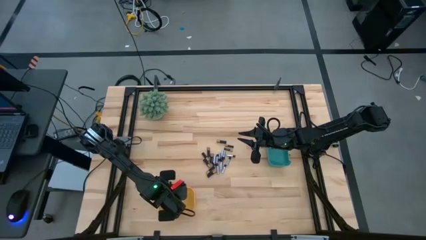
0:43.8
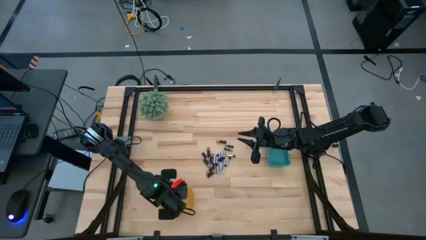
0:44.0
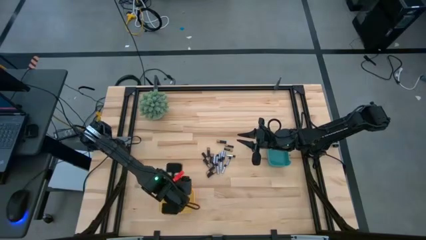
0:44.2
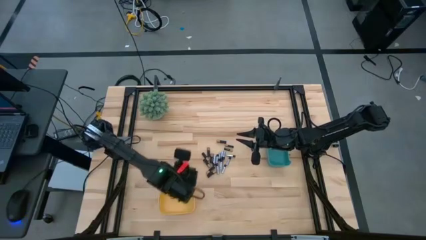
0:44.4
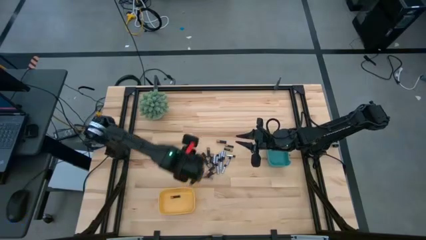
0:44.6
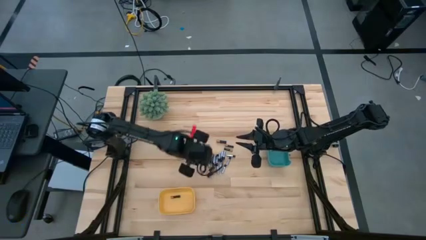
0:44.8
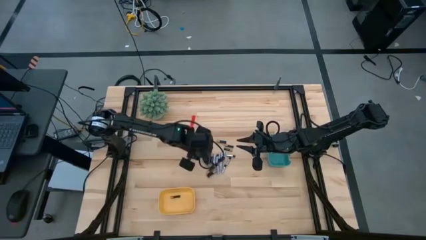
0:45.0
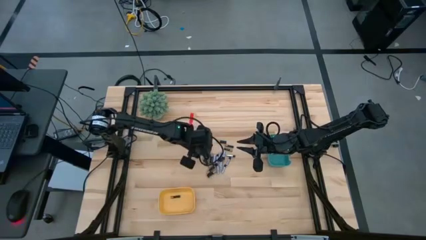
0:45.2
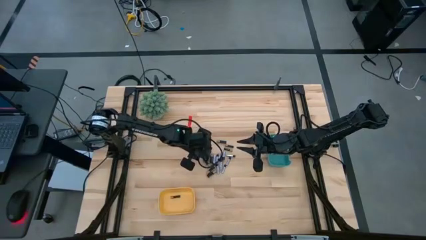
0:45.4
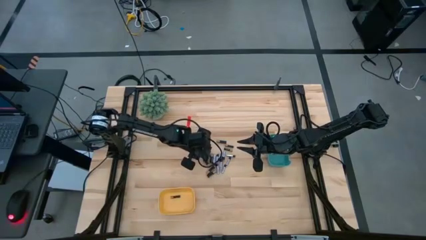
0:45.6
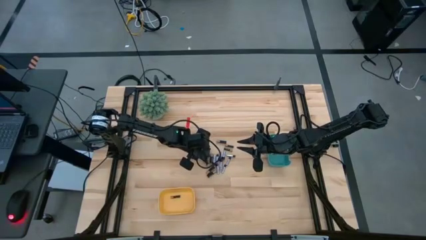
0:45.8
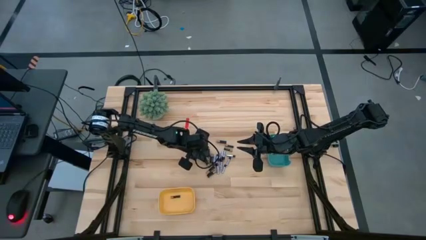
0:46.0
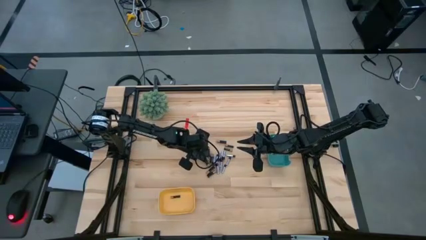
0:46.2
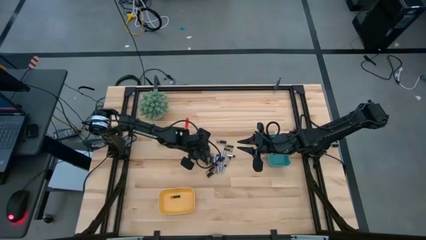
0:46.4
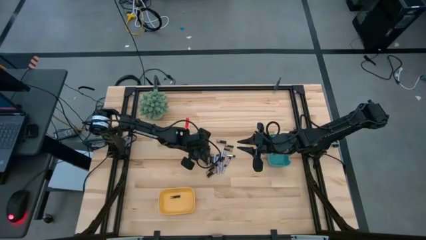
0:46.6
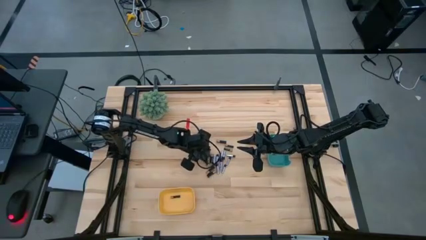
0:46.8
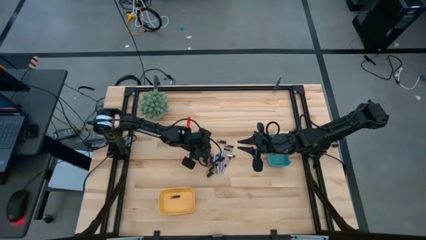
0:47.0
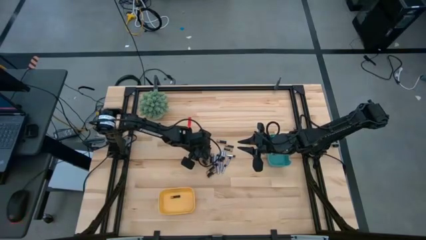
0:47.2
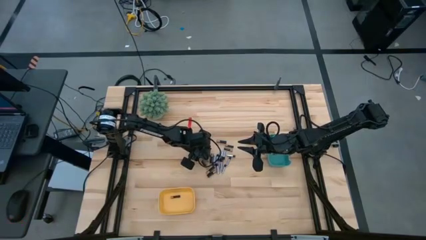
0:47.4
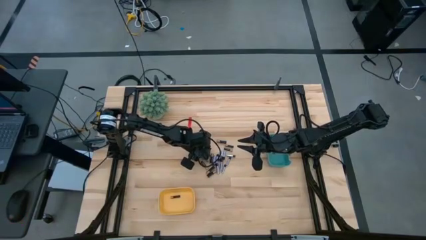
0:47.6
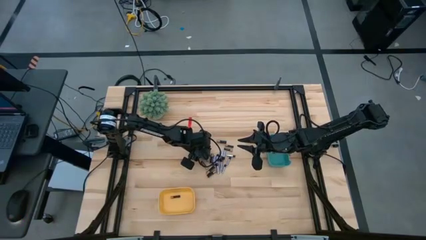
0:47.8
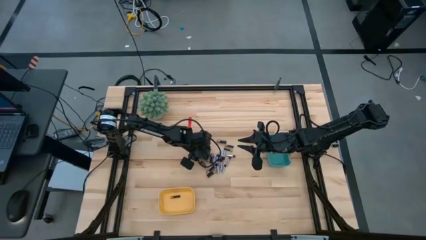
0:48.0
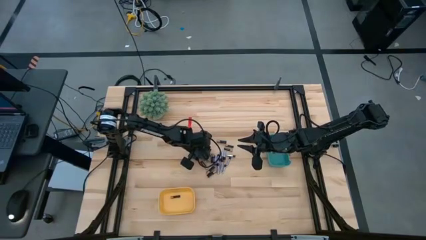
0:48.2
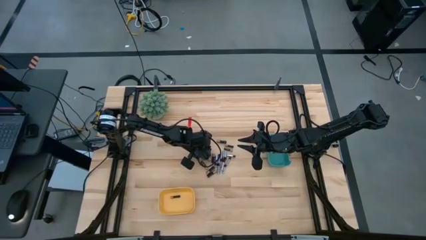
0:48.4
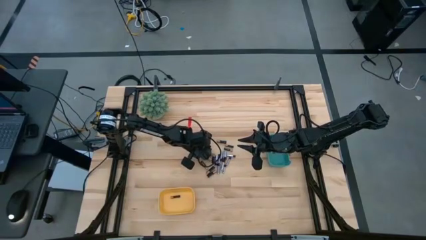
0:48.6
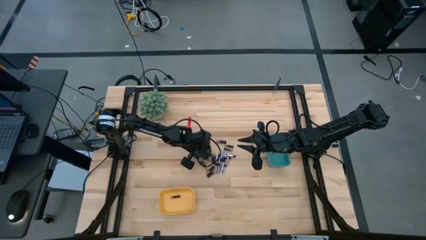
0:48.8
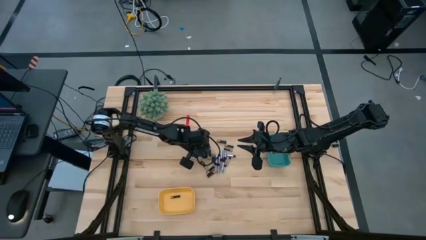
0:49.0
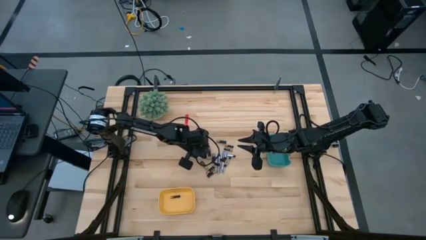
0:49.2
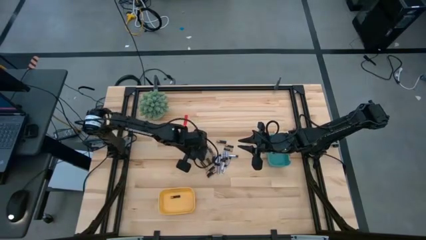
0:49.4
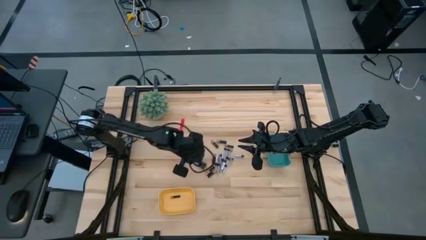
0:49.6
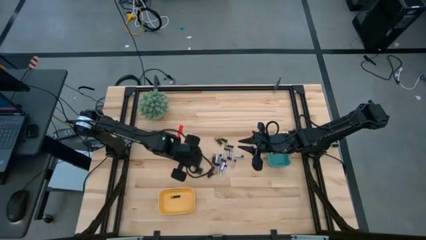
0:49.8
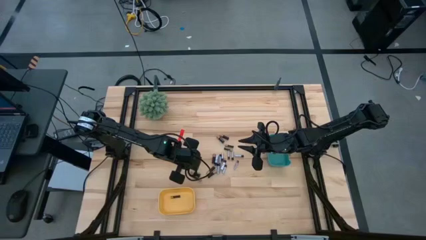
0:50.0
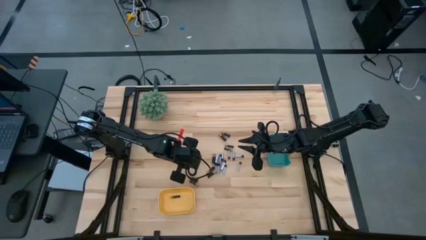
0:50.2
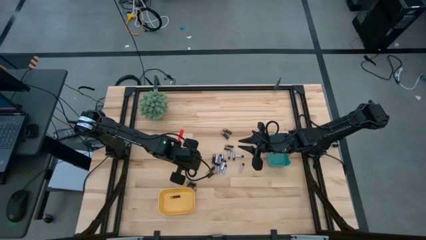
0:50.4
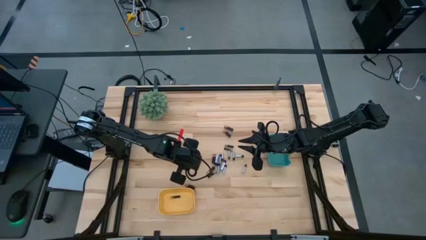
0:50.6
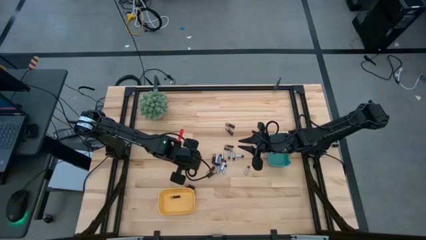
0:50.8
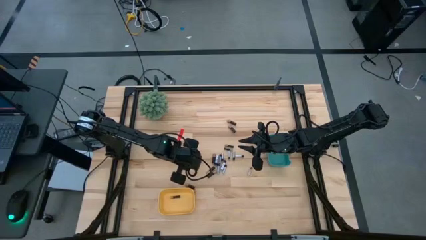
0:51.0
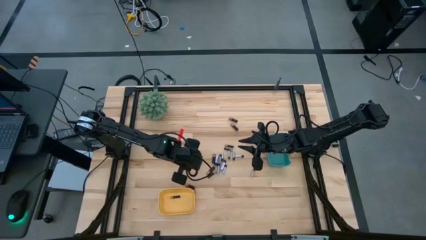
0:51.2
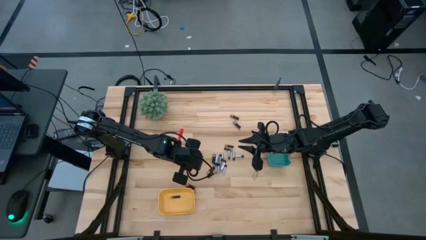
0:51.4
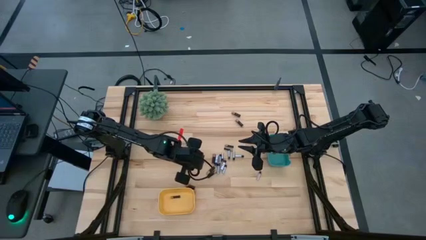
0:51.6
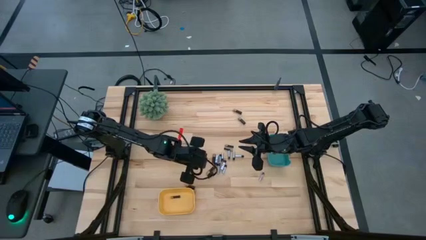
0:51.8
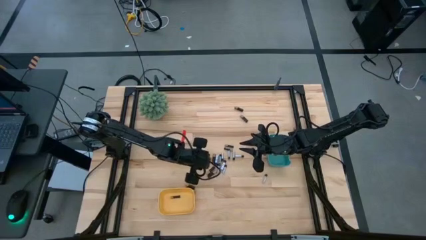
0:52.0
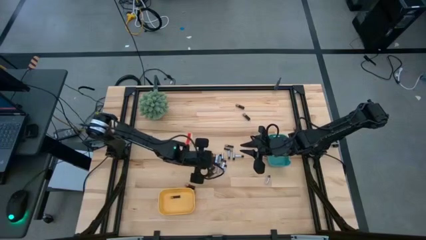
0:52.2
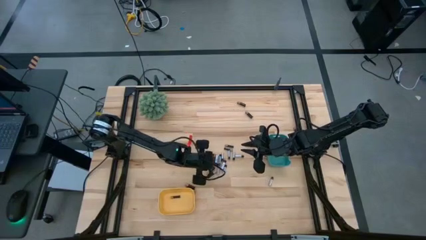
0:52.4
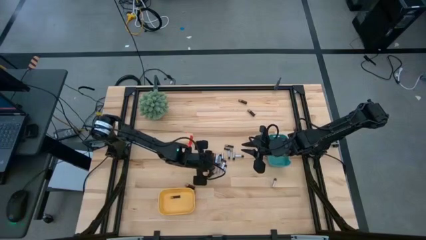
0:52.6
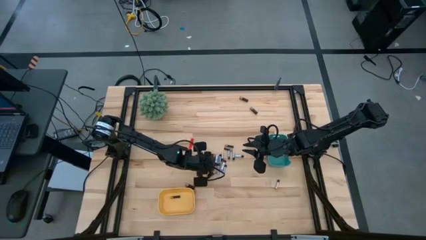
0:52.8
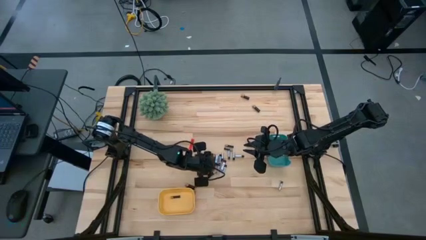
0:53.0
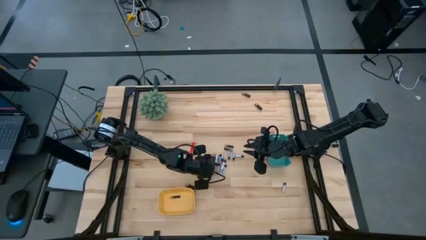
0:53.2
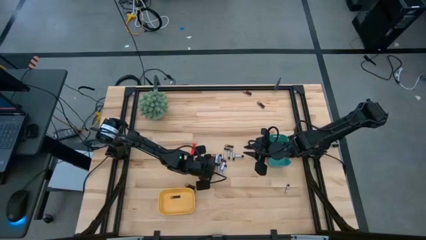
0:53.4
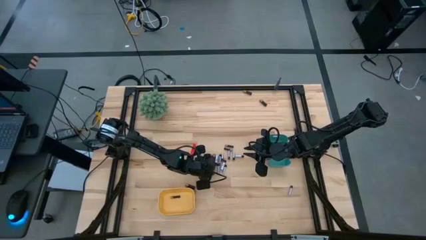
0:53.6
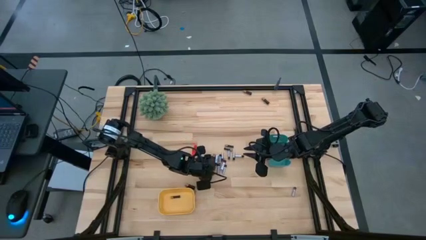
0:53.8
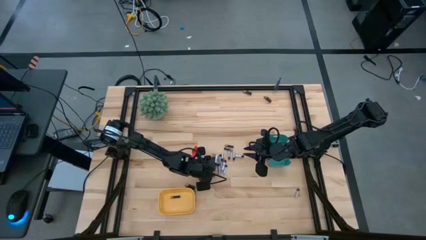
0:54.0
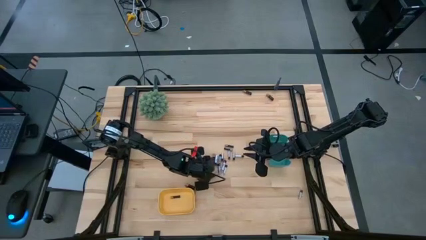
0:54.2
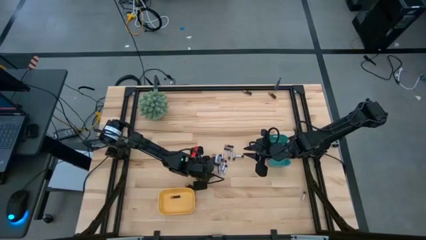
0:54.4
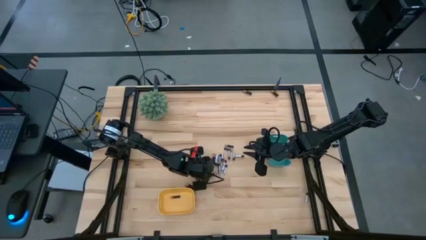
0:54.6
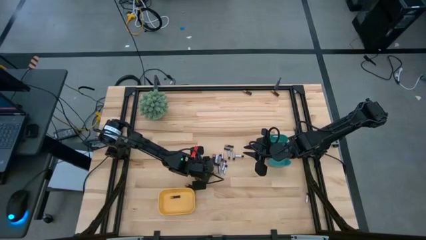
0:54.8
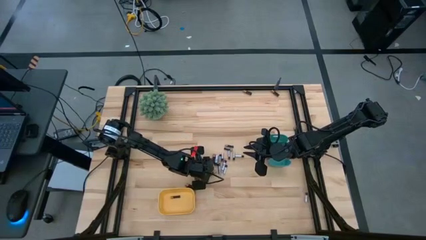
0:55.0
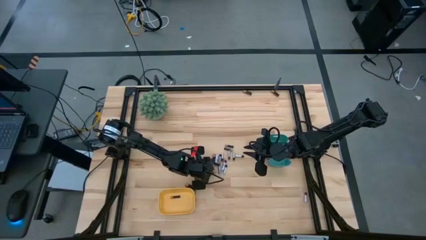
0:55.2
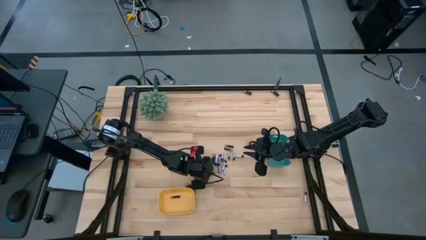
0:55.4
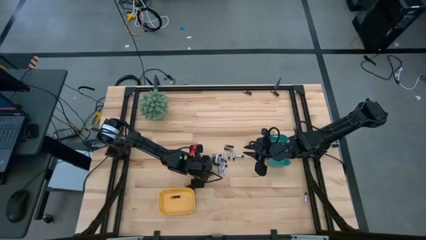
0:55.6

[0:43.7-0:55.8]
Task: Sort batteries
Put the black battery into the yellow bin

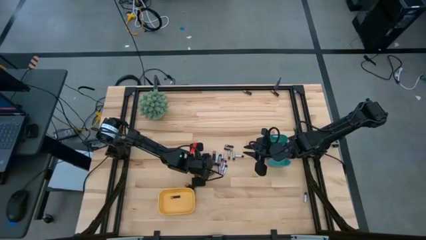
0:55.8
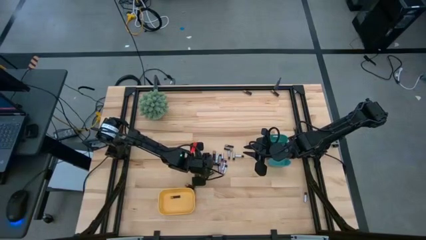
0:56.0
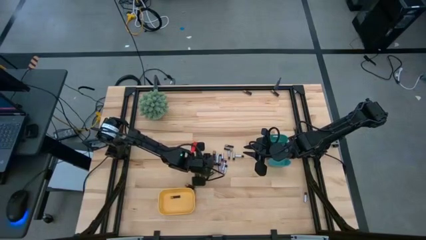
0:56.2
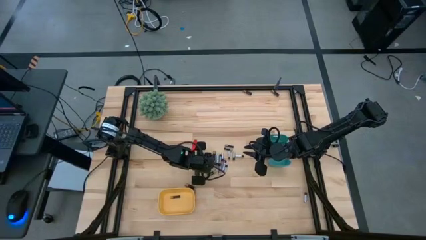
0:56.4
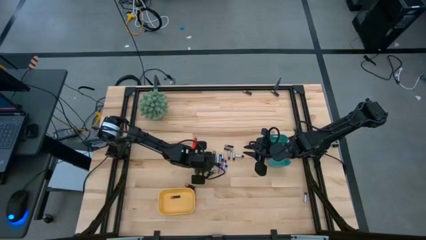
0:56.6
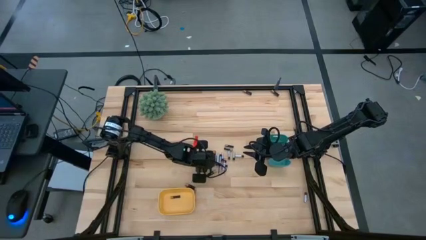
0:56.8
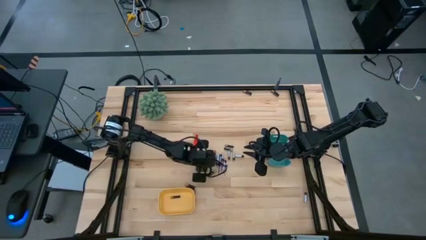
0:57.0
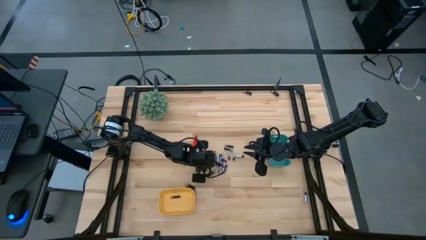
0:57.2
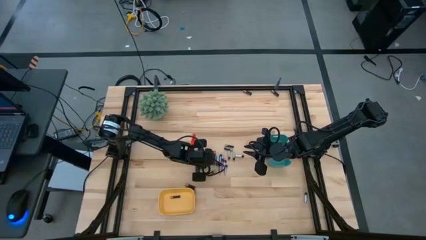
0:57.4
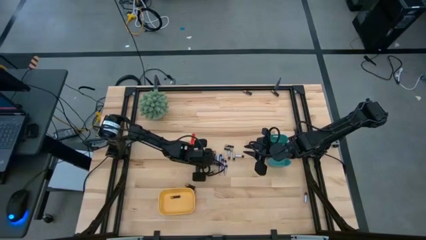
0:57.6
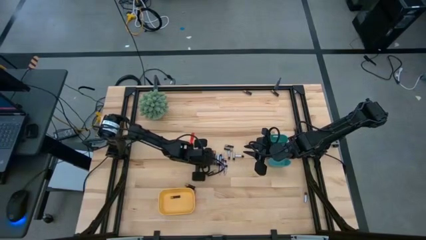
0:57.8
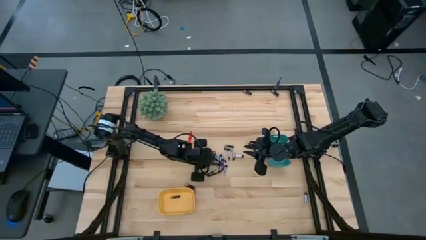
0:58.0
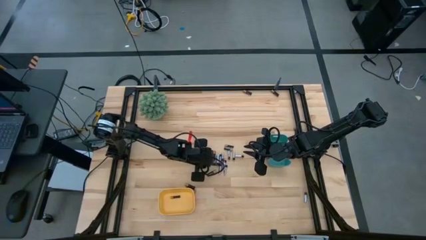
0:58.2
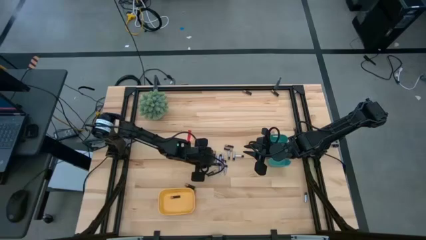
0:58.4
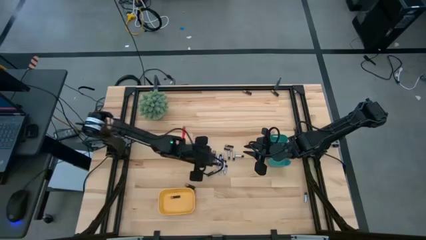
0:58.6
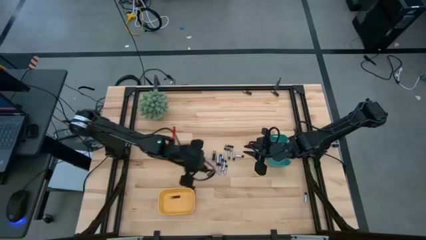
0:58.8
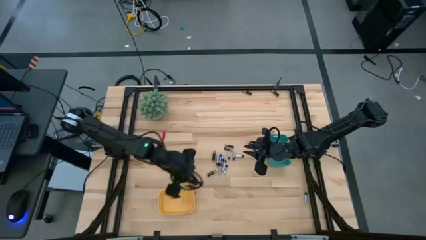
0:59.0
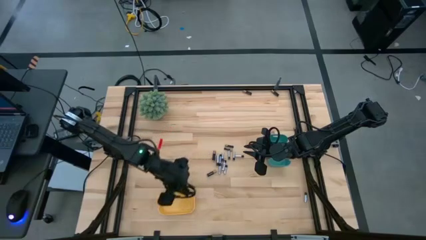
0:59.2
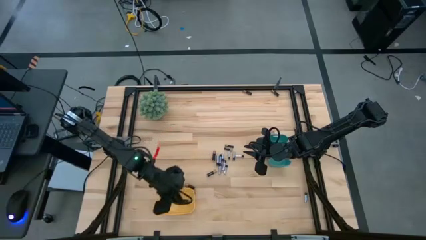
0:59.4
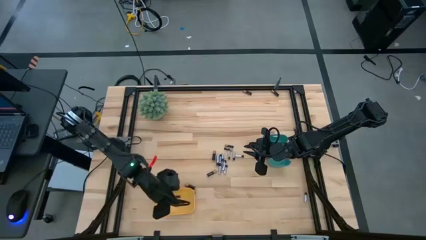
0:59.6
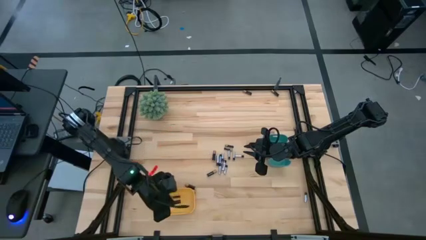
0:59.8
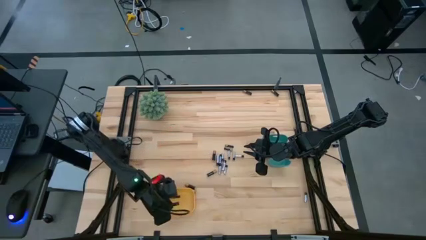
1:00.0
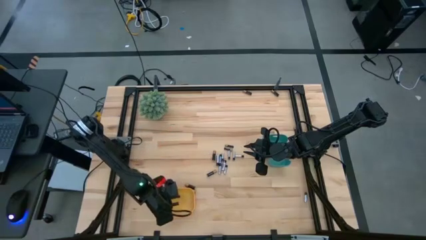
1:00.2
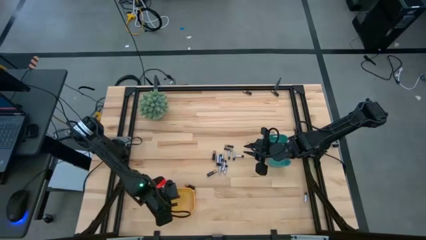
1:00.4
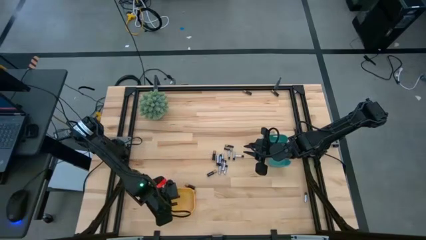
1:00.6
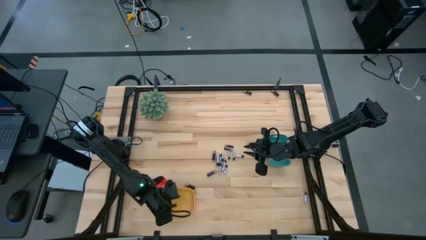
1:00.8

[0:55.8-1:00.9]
Put the black battery into the yellow bin
